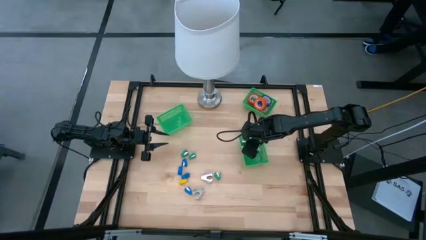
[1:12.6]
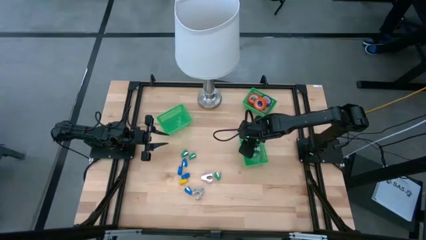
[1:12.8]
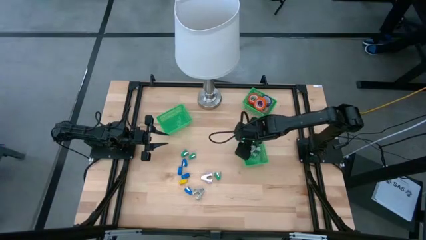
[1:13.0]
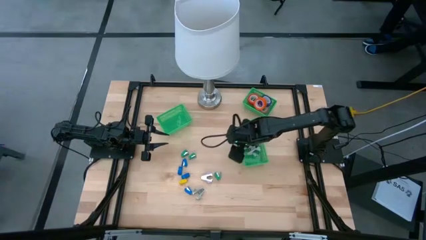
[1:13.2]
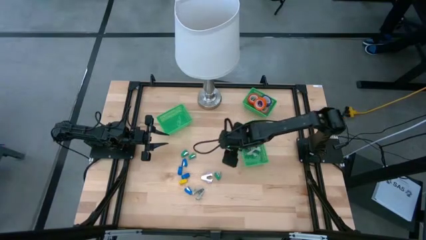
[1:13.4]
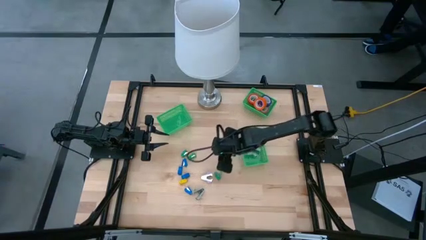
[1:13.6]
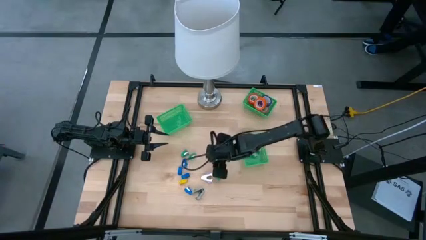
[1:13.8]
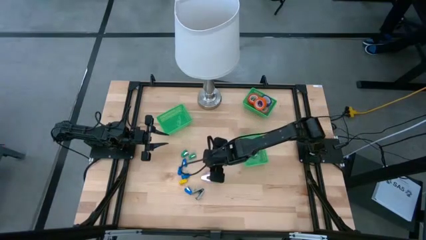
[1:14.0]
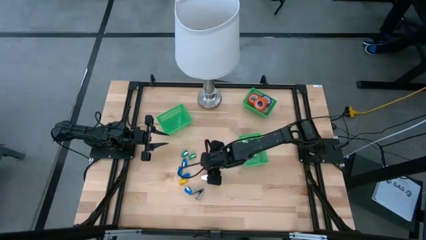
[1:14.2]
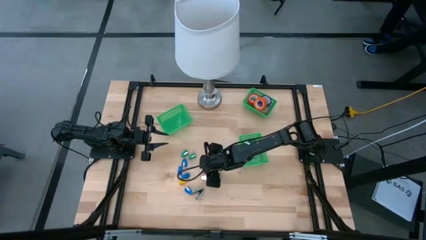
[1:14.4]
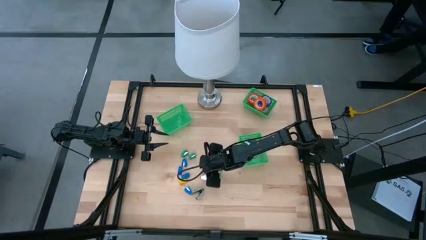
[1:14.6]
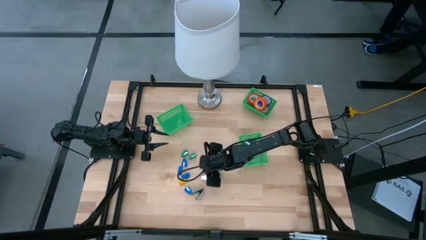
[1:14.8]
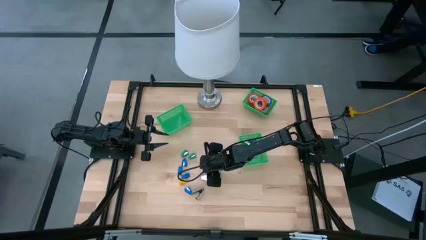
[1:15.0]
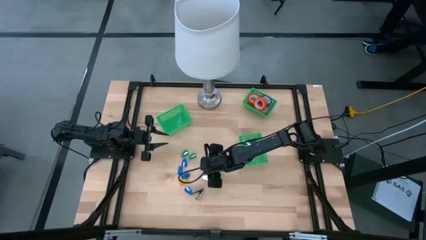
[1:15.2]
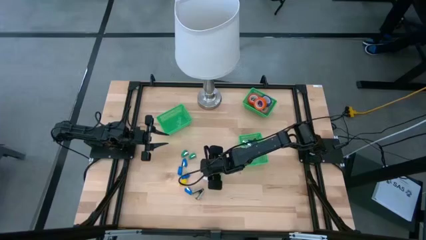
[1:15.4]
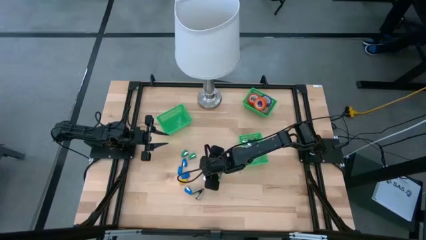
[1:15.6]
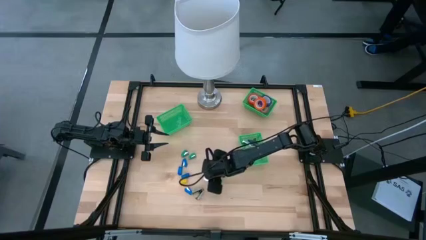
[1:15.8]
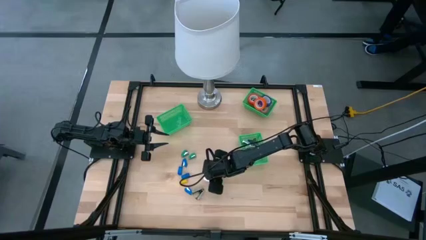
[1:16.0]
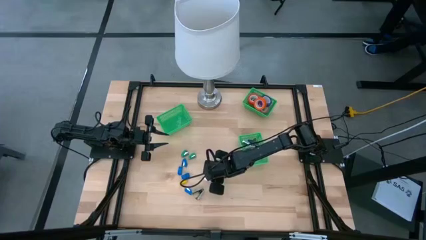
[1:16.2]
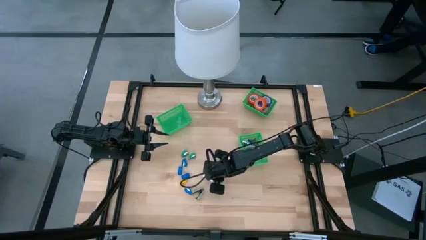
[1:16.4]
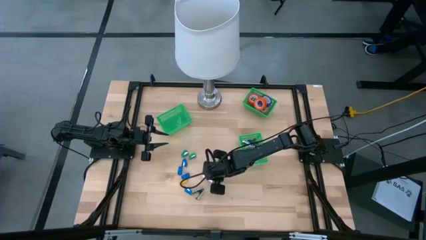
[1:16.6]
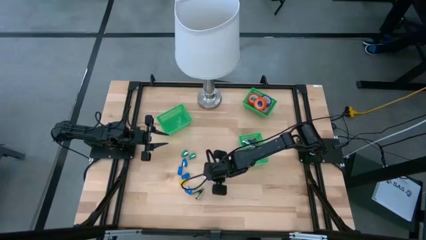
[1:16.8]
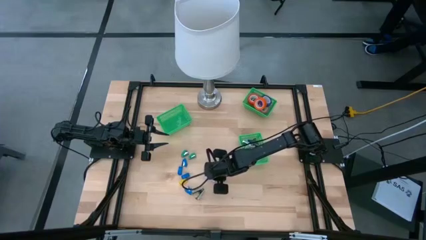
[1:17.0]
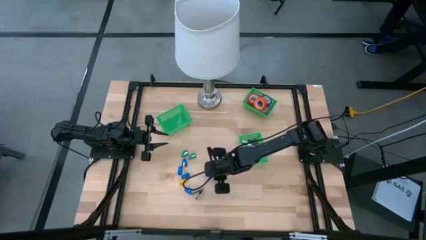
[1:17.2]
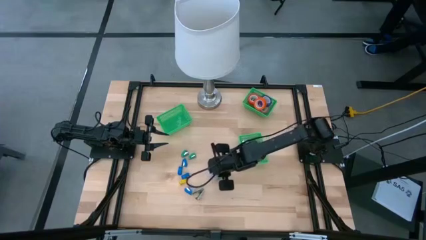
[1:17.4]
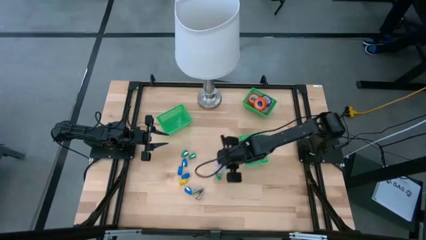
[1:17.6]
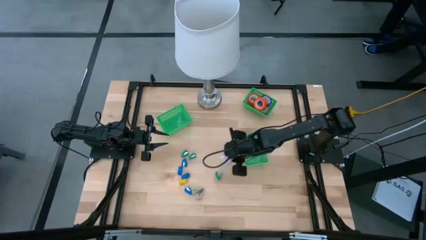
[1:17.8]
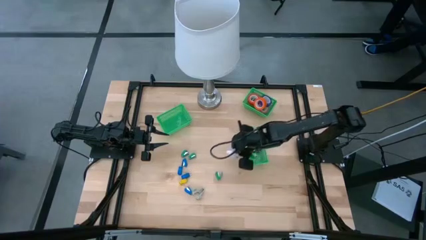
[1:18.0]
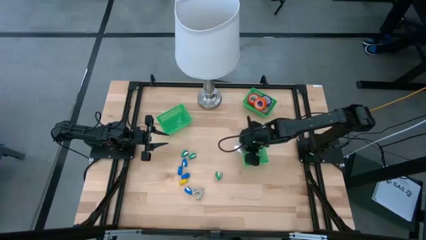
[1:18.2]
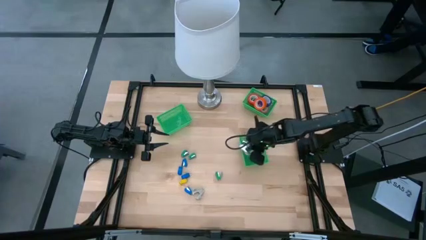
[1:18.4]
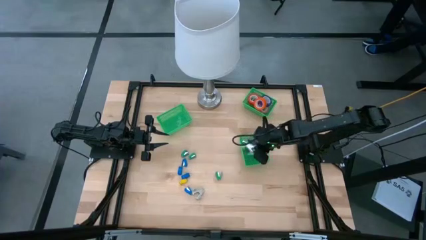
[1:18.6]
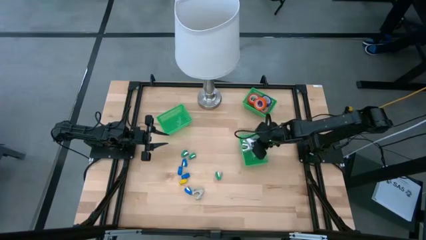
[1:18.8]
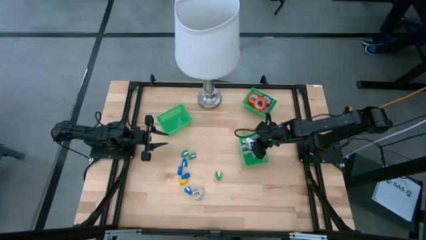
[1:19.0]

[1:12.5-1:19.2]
Task: Pick and place Stapler, Stapler remover, tape
Put the purple staple remover into the bottom right green bin

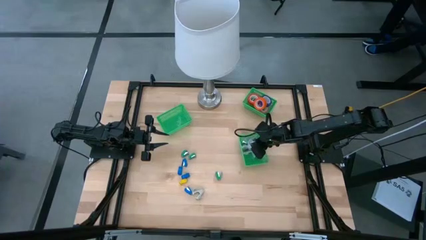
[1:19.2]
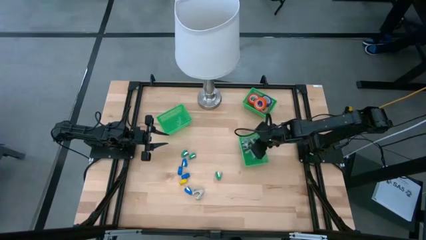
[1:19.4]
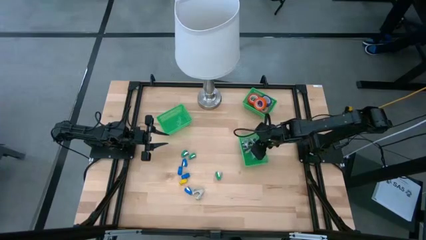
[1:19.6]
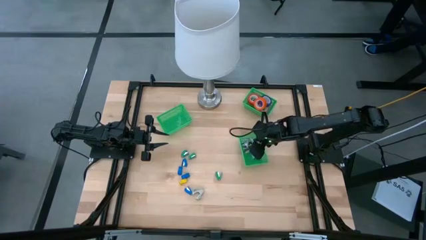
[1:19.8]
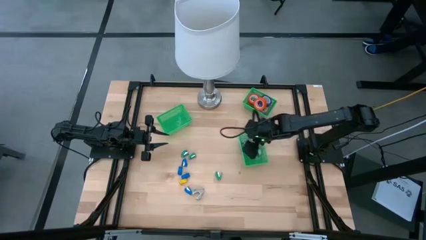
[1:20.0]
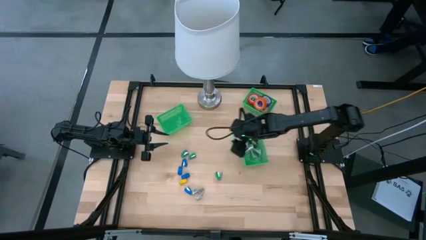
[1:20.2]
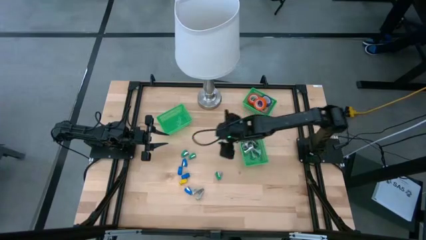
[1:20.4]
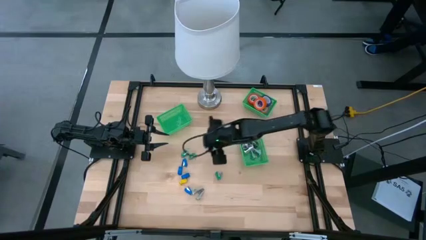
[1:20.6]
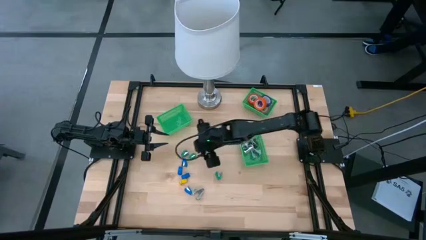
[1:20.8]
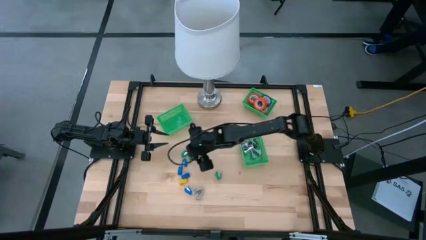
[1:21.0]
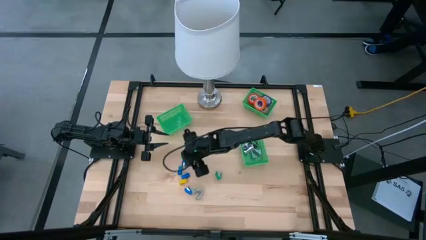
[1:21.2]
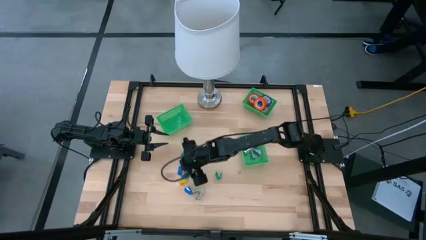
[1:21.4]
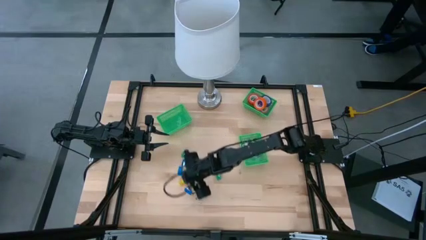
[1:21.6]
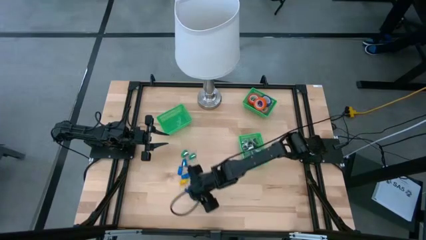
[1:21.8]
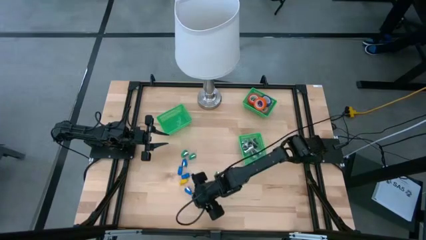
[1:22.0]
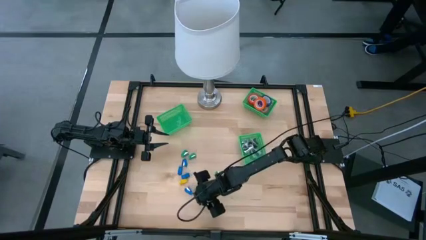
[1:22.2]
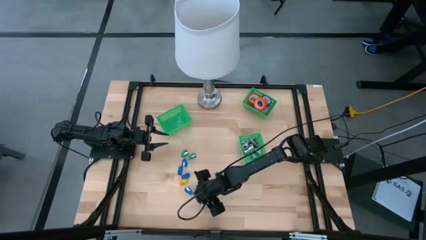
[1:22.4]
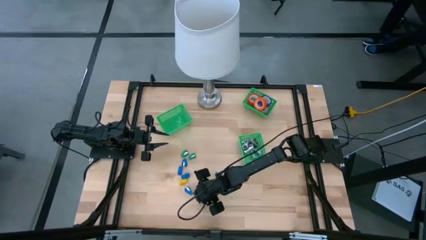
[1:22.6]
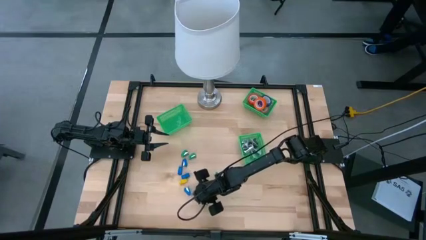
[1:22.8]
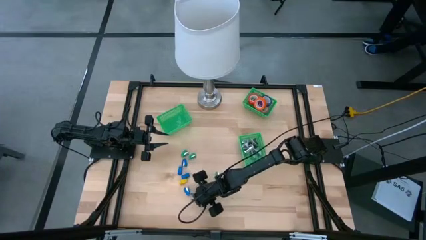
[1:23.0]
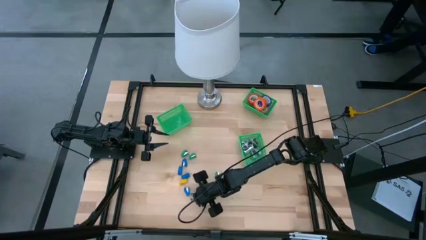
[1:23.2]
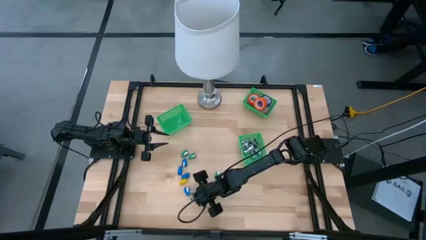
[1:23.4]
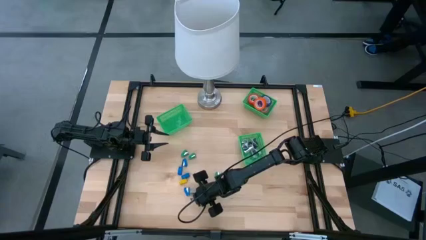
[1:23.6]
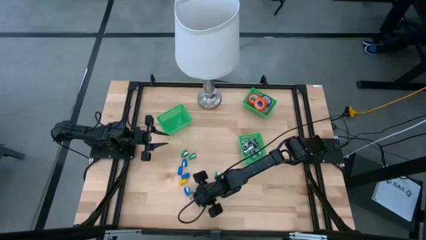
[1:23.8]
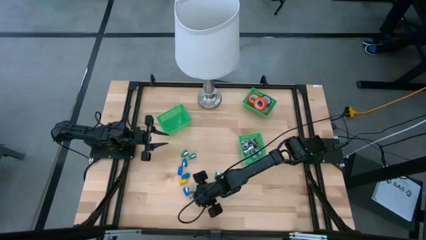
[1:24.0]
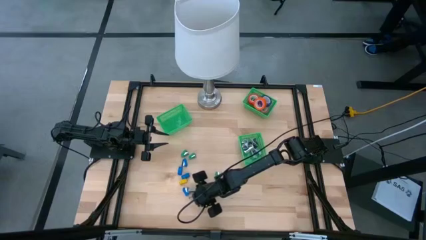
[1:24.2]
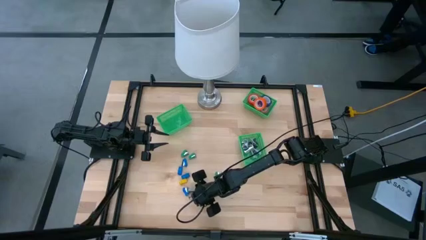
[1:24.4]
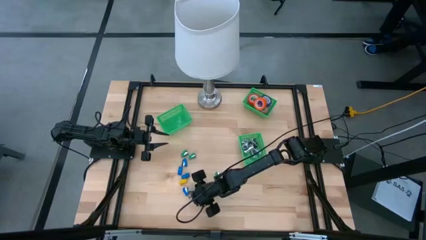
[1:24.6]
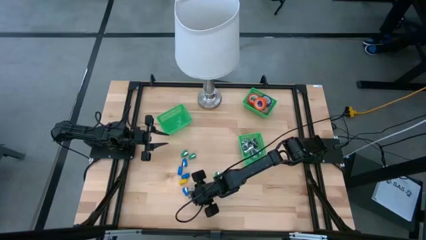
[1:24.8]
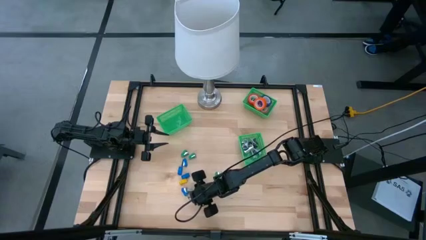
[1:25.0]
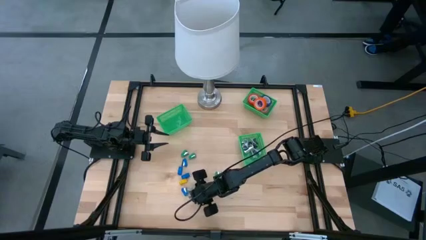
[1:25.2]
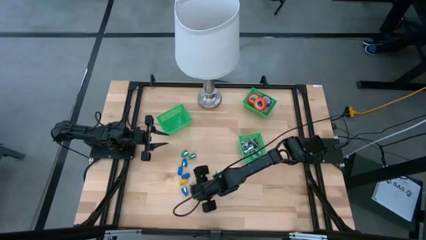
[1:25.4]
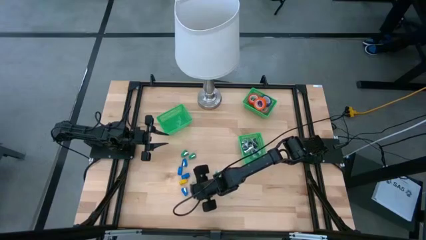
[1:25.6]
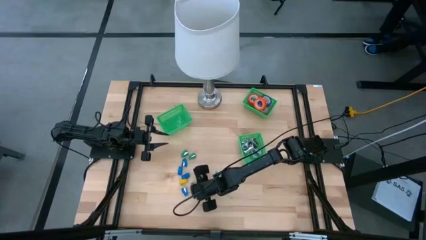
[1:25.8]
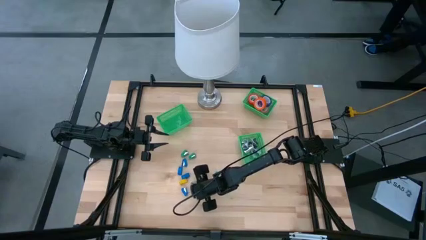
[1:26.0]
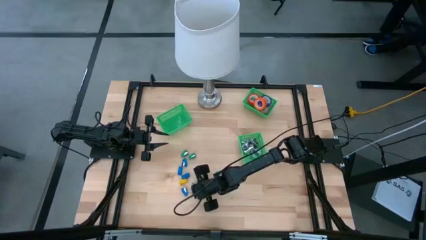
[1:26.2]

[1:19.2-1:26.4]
Put the gray staple remover into the bottom right green bin

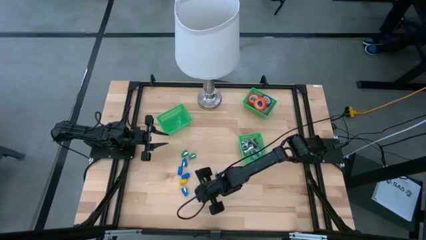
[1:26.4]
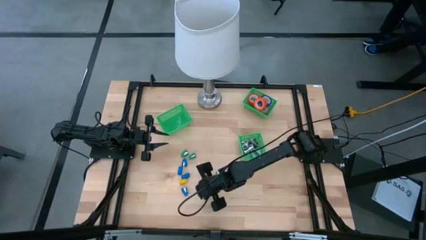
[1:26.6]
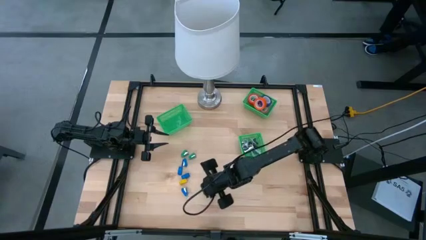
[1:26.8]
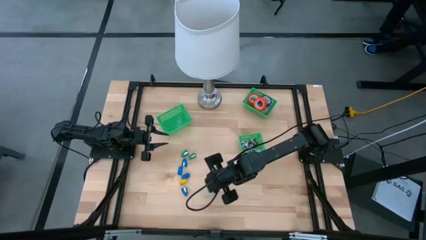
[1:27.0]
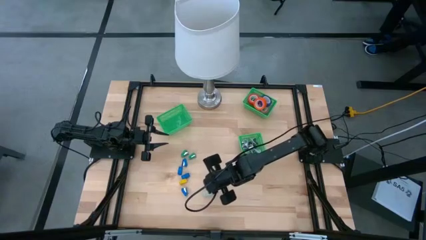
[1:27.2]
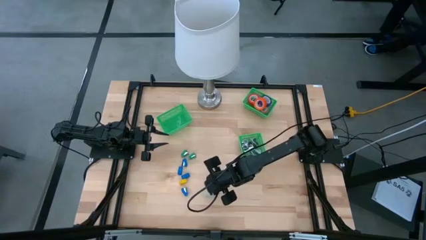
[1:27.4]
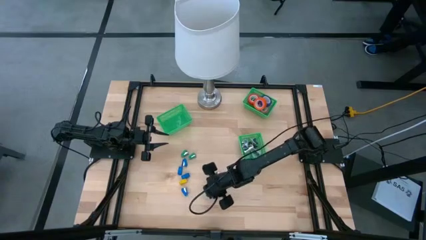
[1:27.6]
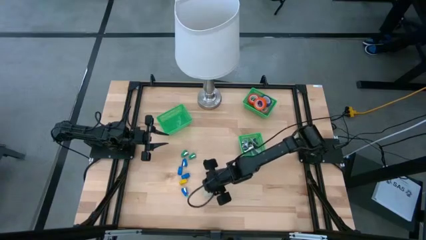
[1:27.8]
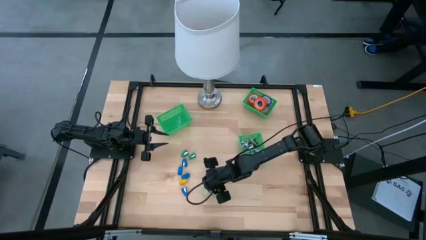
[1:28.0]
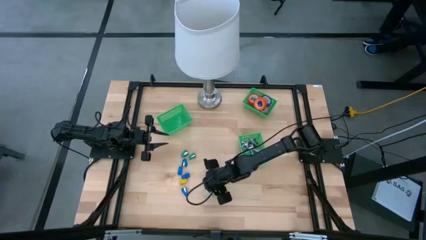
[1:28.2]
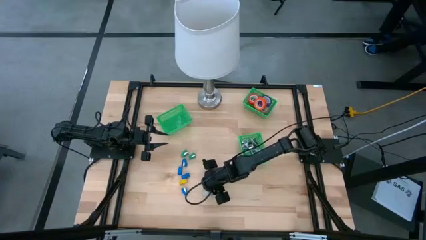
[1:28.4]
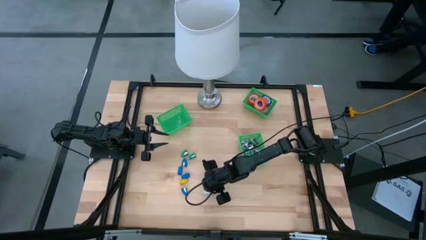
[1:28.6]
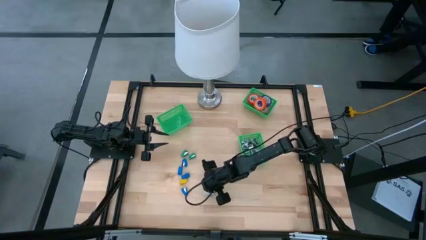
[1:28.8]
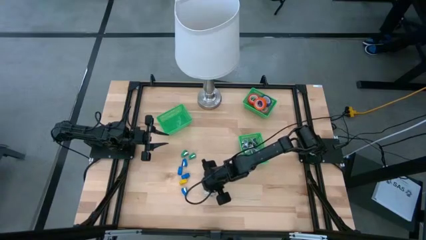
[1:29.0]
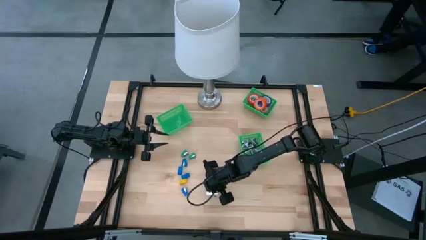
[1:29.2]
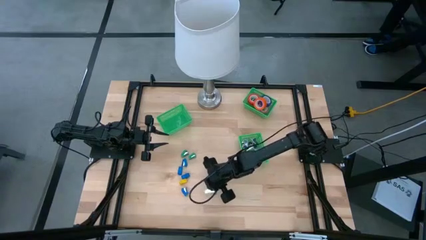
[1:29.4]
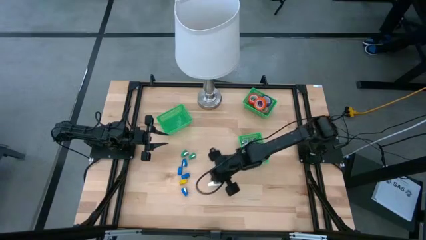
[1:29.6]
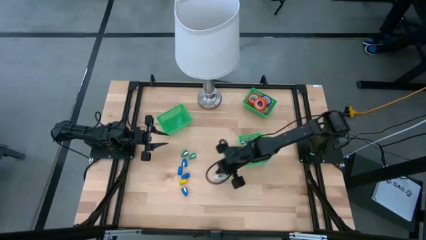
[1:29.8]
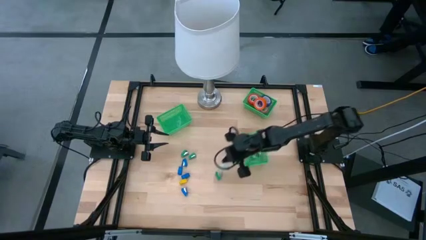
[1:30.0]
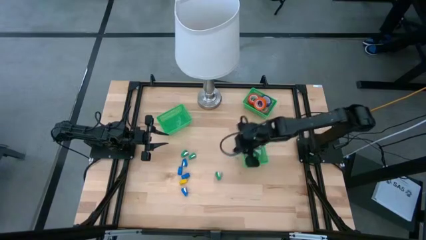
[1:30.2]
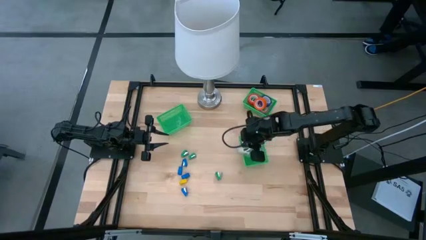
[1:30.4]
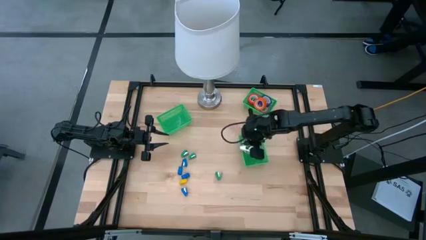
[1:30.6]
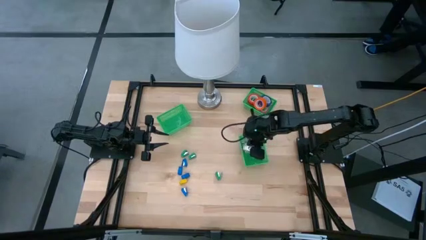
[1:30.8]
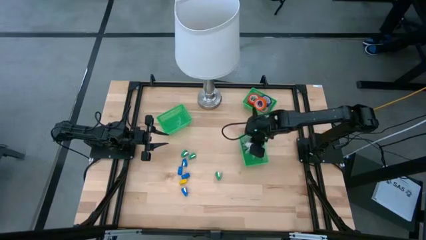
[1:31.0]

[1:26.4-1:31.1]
Put the gray staple remover into the bottom right green bin
